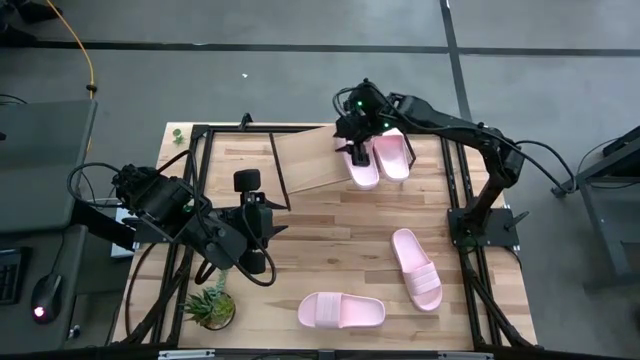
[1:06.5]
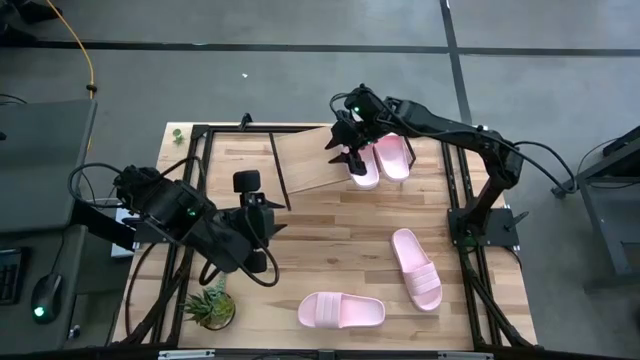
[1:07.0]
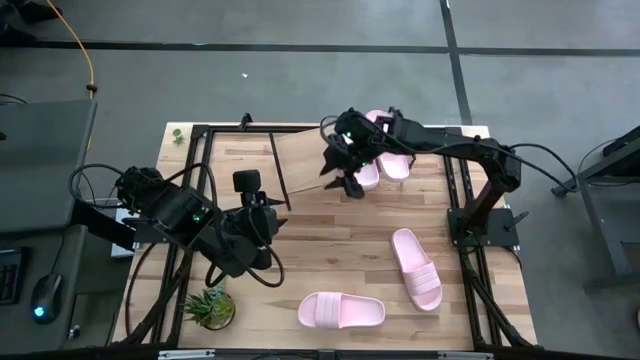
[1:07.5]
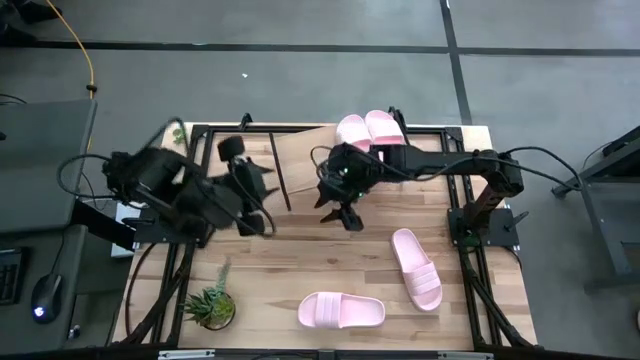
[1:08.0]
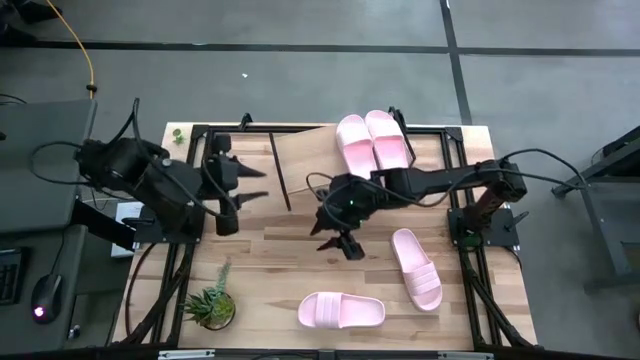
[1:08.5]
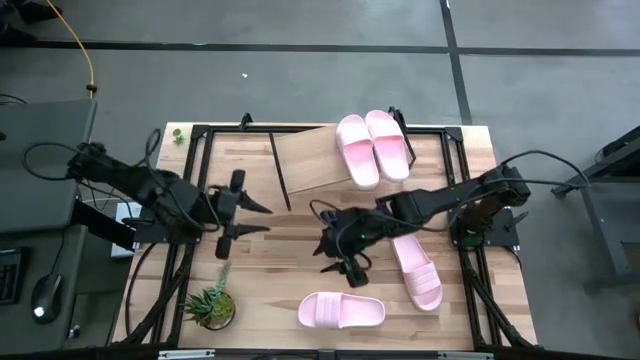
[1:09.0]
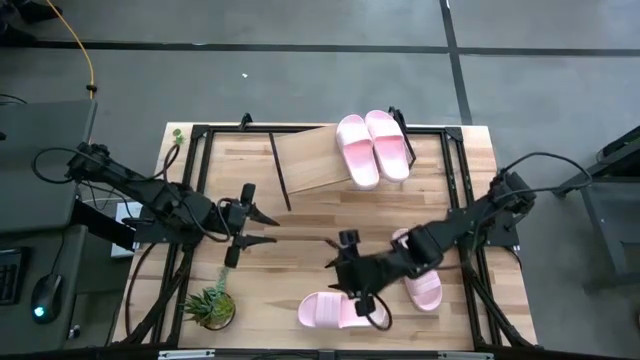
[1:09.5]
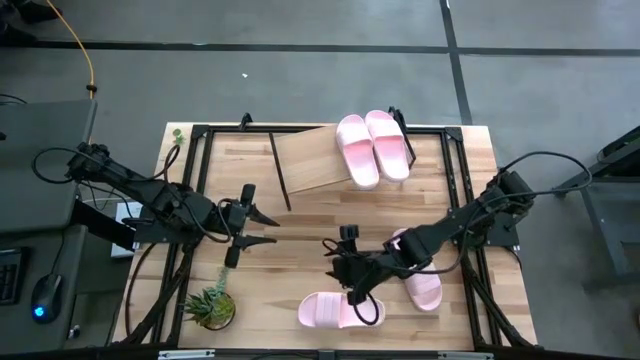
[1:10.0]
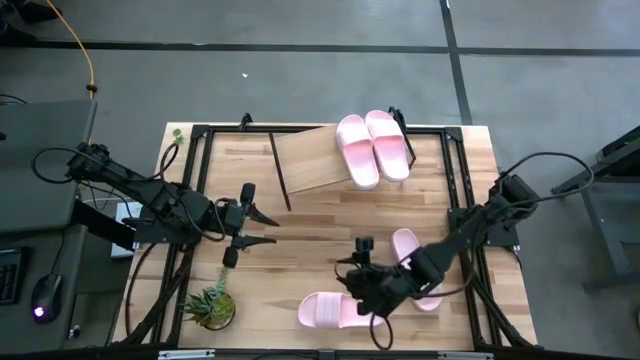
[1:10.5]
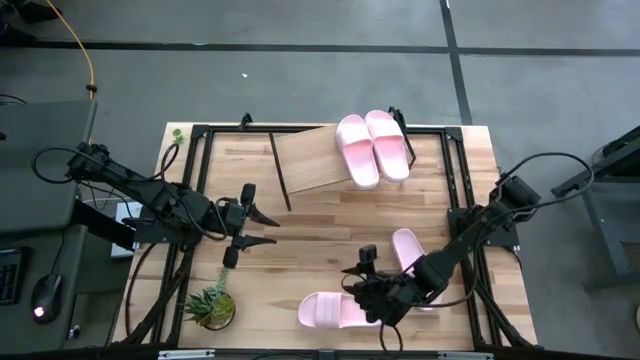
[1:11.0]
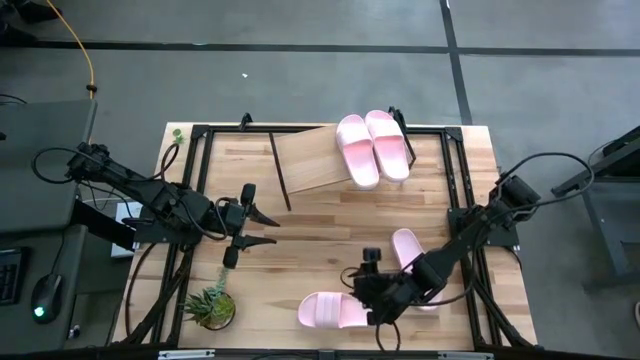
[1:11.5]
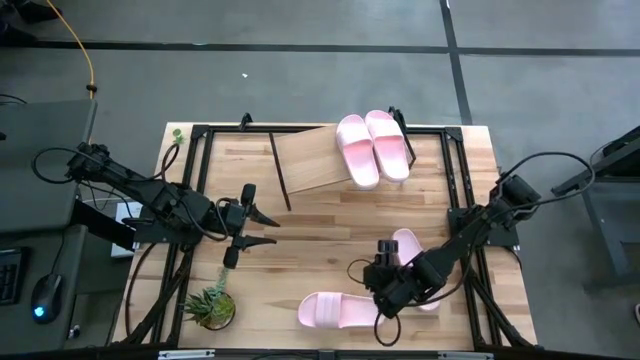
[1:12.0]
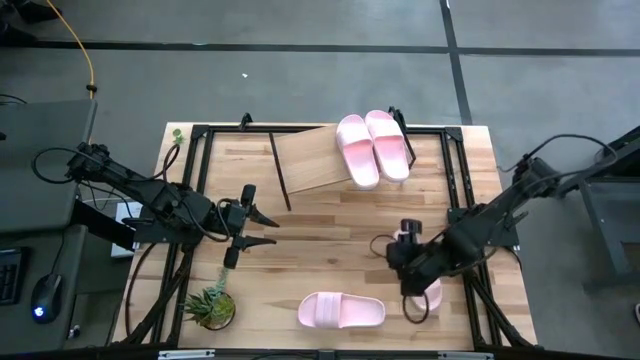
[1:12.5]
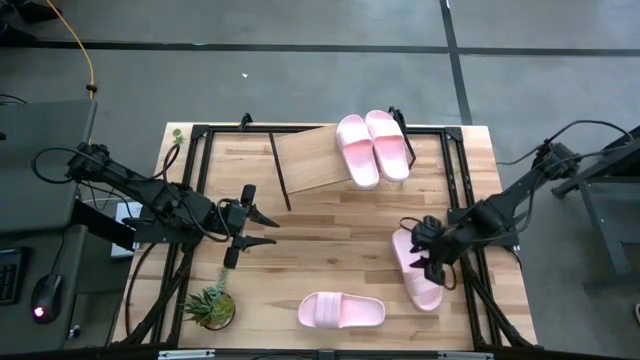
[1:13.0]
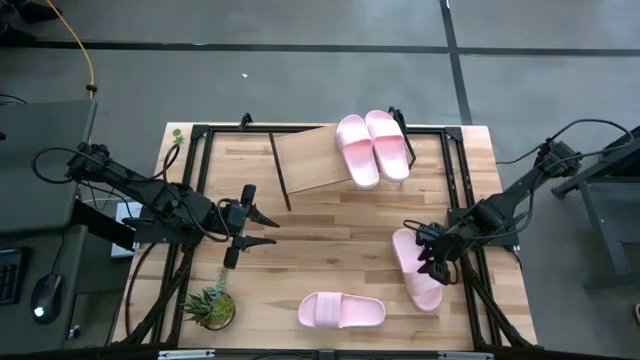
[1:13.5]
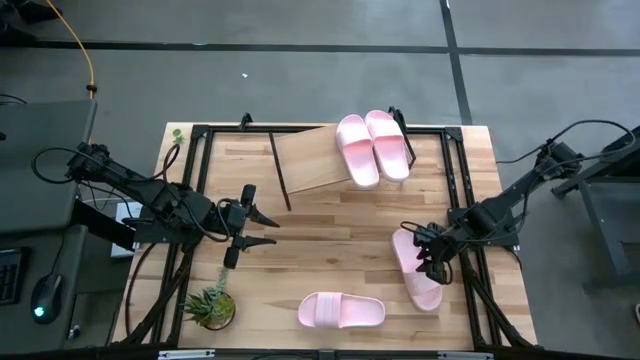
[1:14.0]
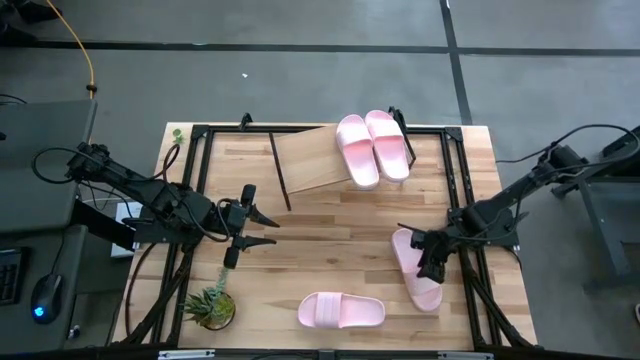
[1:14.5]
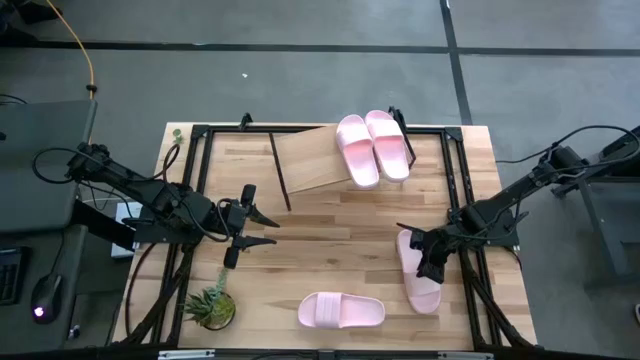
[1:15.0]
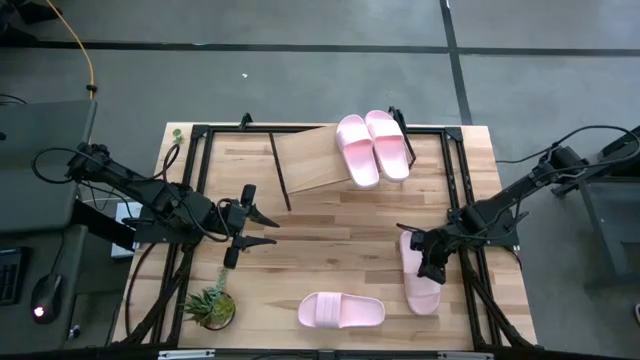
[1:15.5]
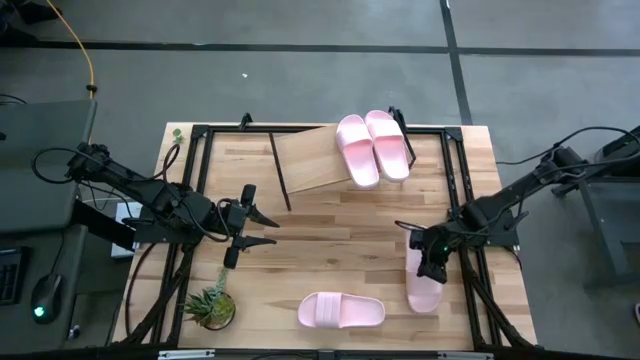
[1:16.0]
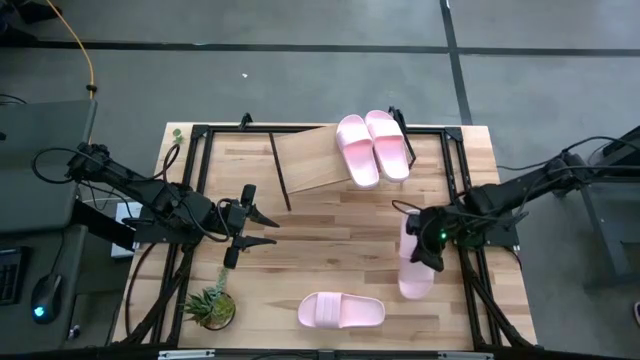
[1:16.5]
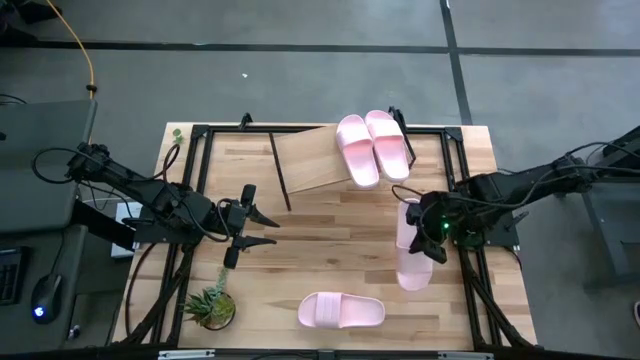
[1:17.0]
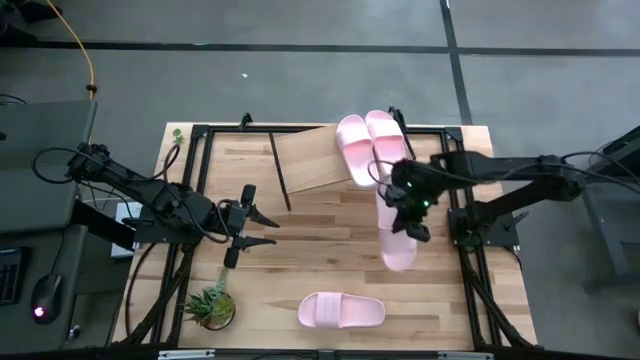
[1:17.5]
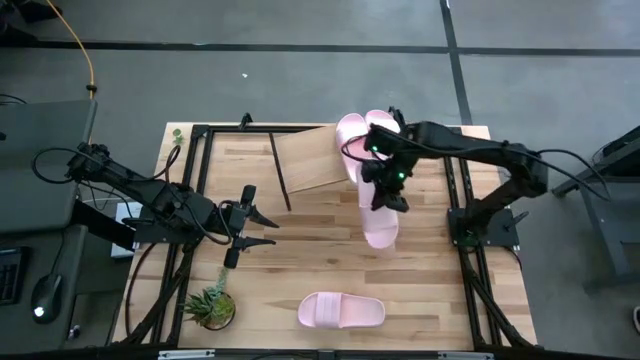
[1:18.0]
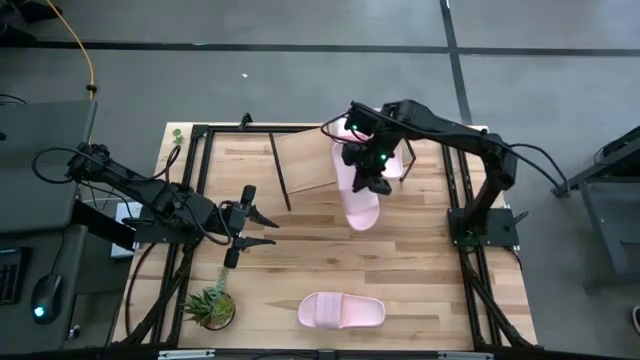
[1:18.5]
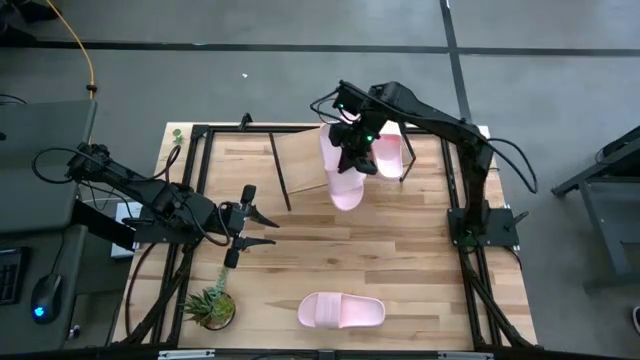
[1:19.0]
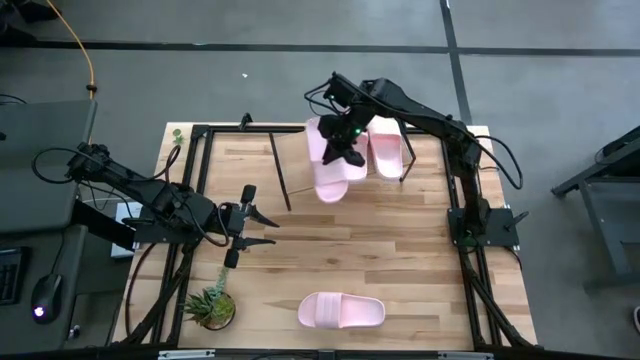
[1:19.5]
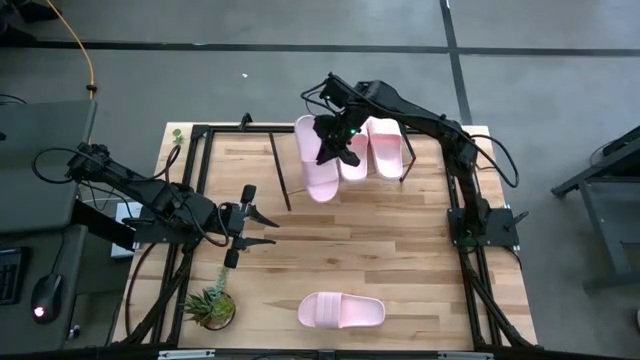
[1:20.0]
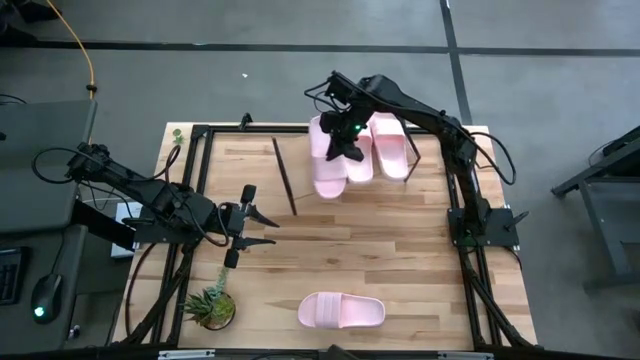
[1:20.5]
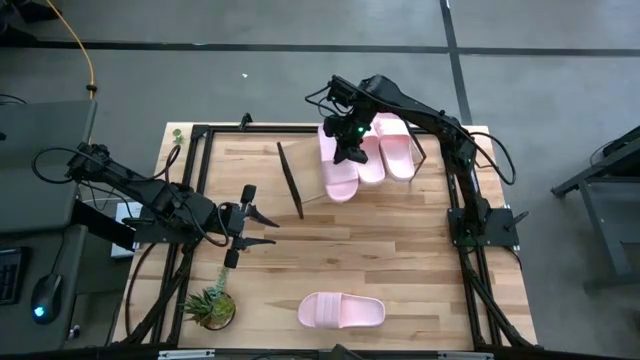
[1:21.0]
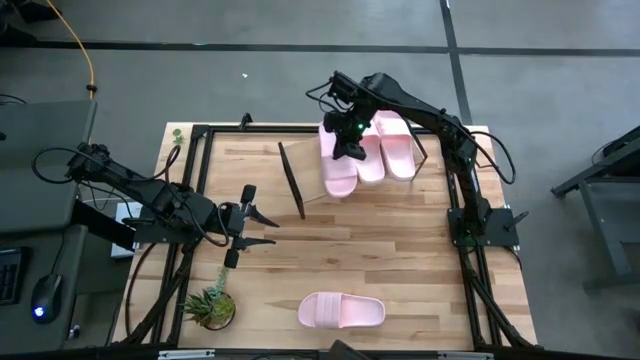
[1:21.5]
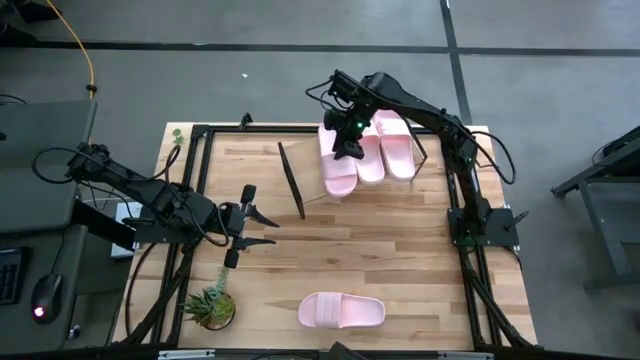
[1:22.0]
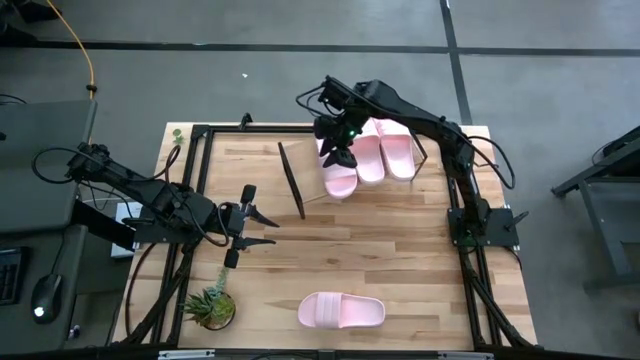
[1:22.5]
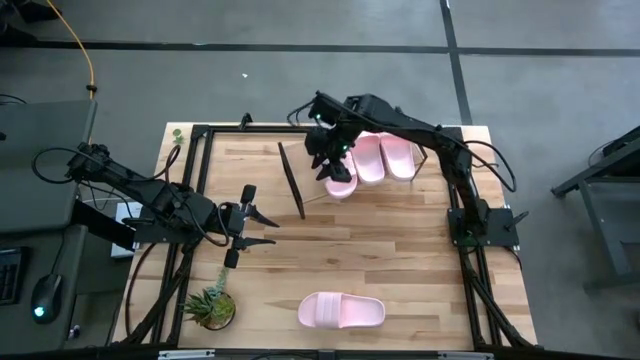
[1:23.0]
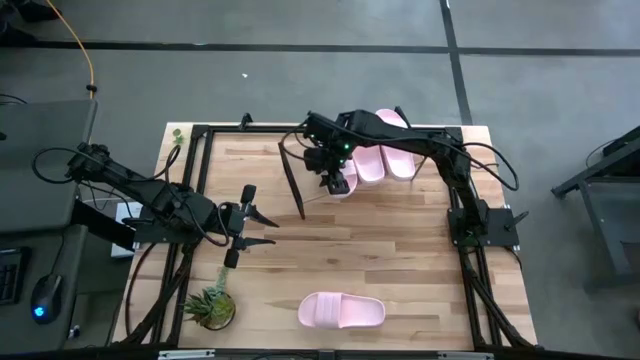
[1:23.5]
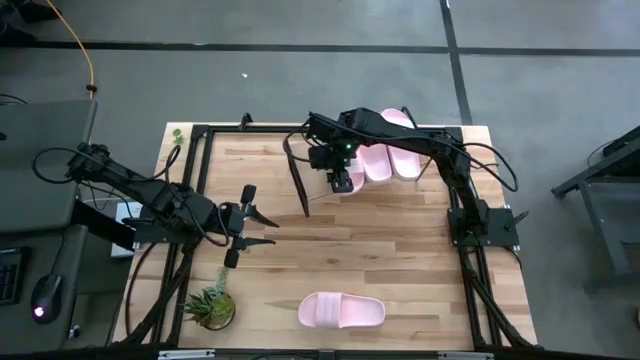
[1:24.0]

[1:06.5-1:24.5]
Task: Pick and place slides into the shelf
Put the pink slide on the shelf

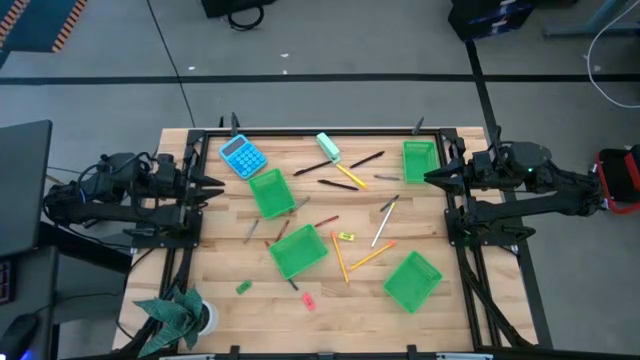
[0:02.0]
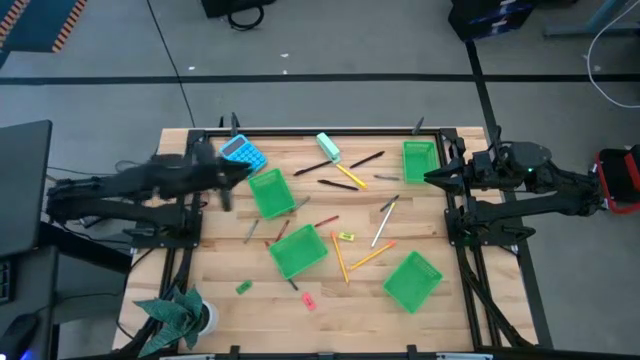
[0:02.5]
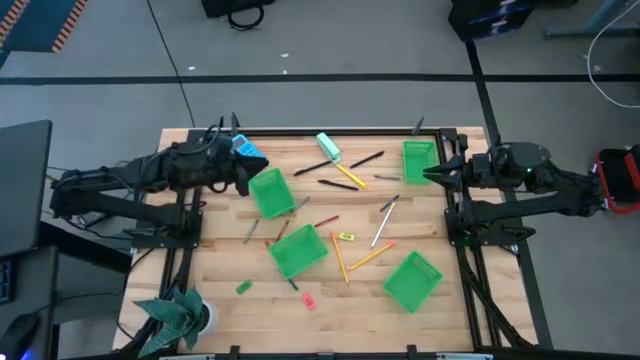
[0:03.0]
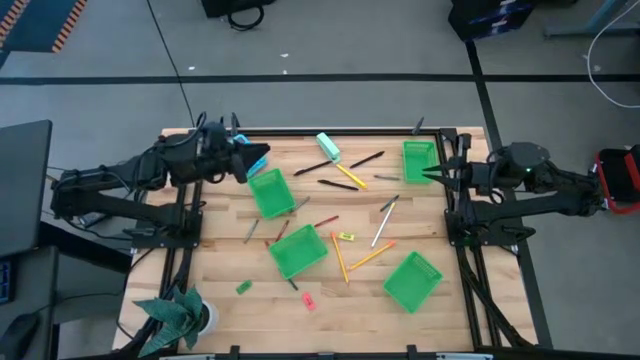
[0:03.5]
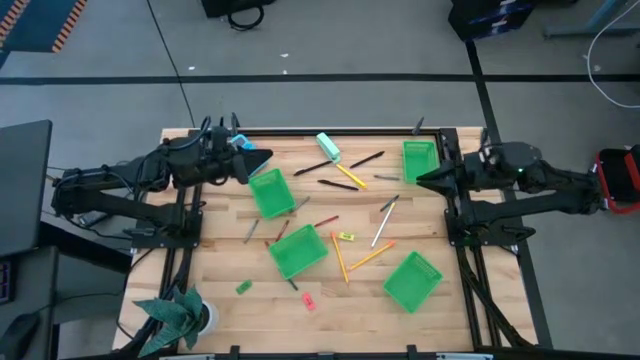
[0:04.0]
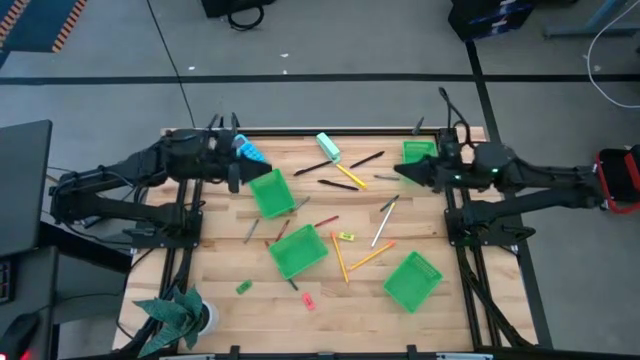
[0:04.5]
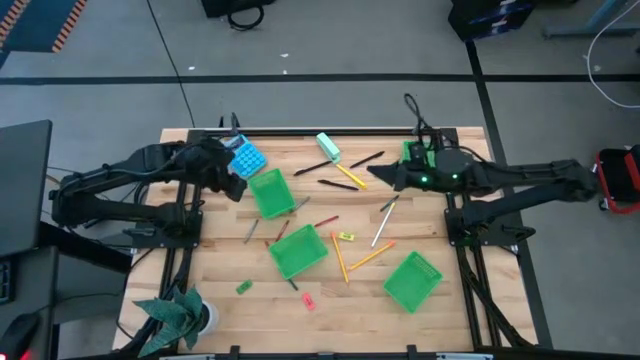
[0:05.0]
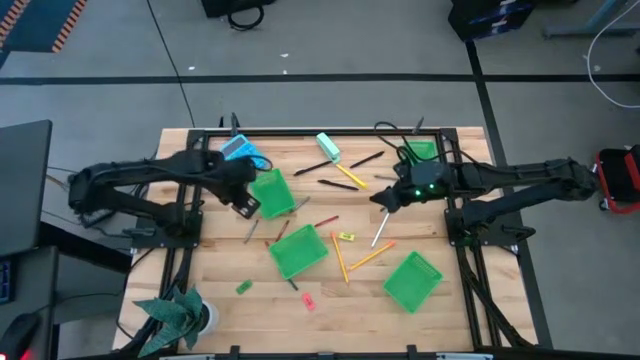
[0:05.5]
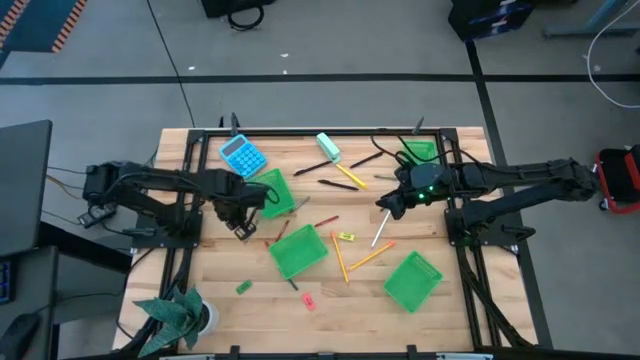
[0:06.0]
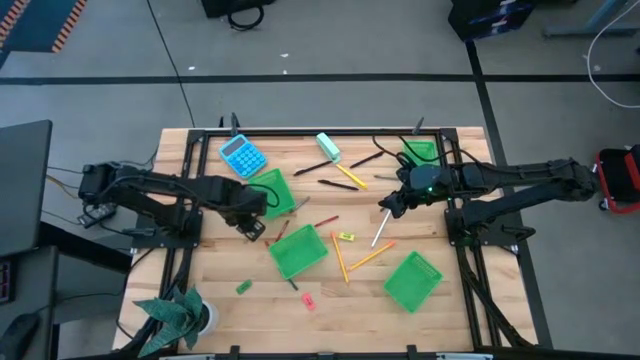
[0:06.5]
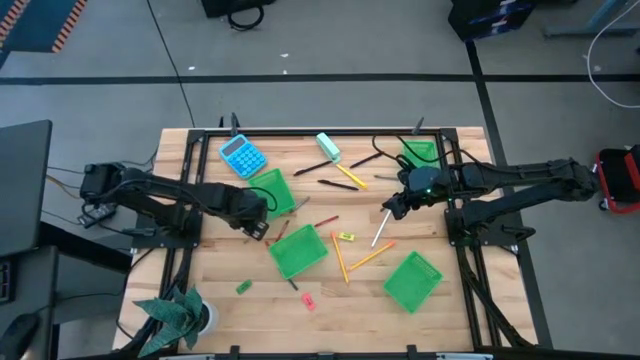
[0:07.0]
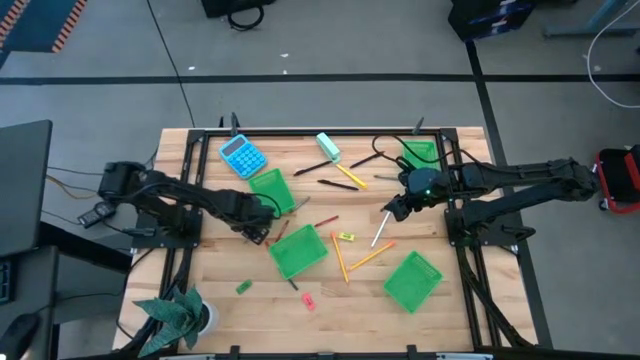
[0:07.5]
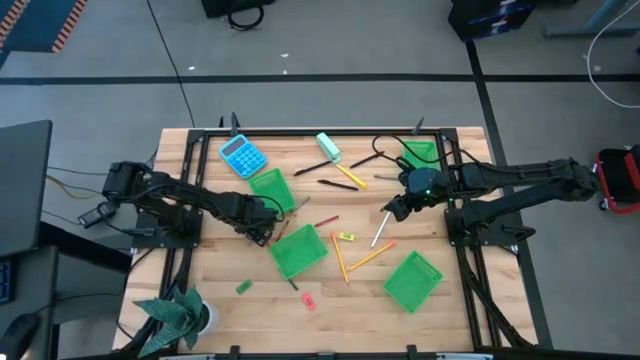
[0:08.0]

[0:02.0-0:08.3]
Task: Sort crayons/erasers/pens/pencils in bins
Put the bottom gray crayon into the top left green bin
